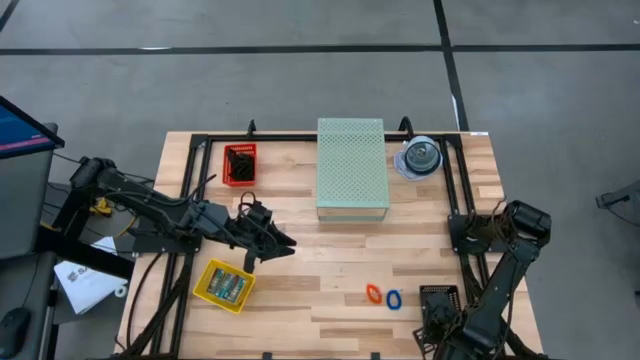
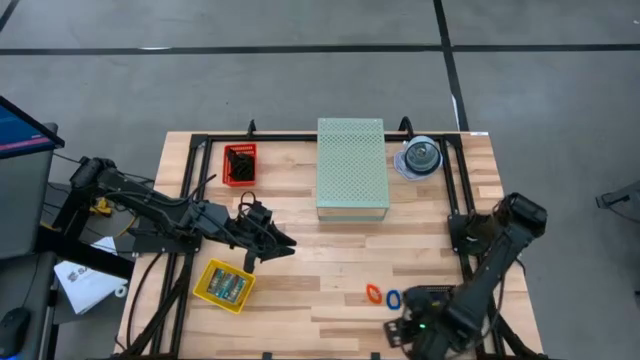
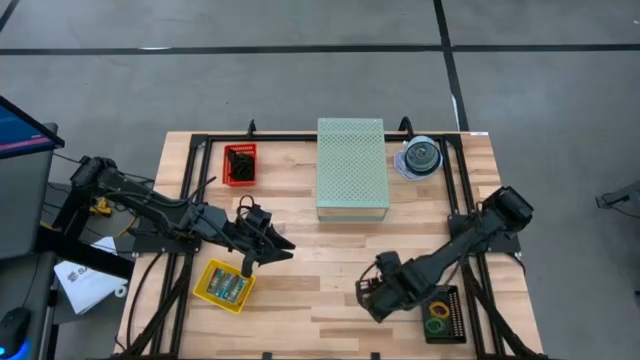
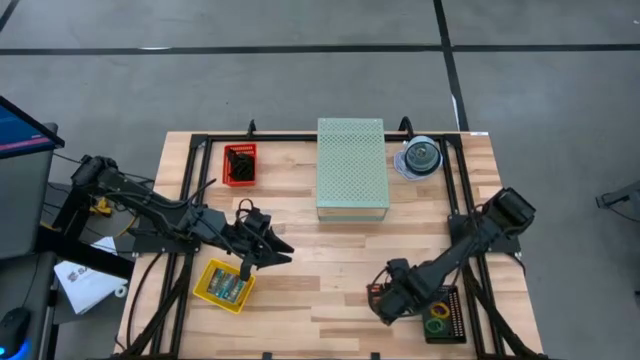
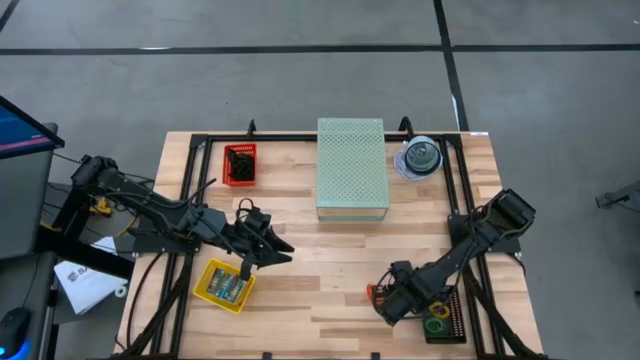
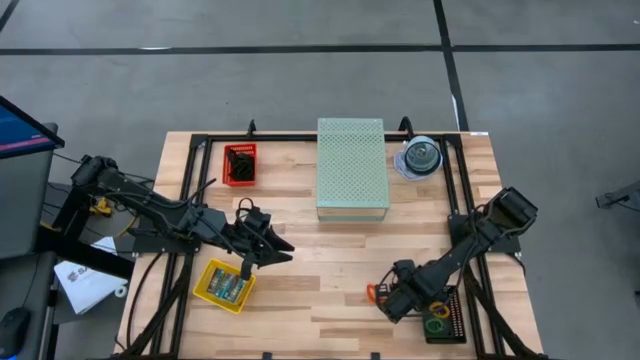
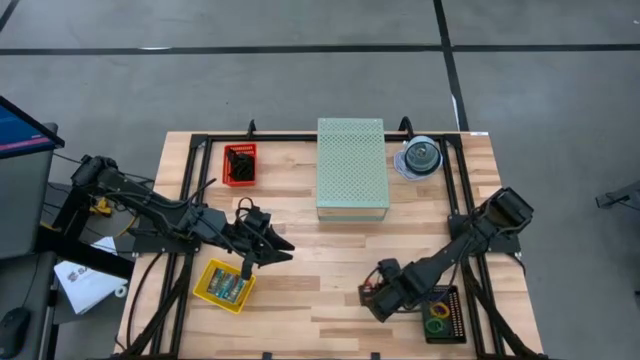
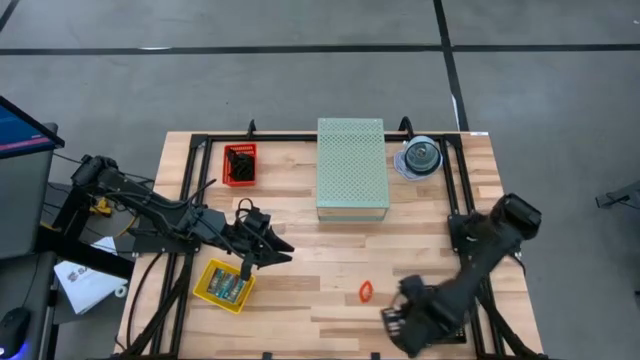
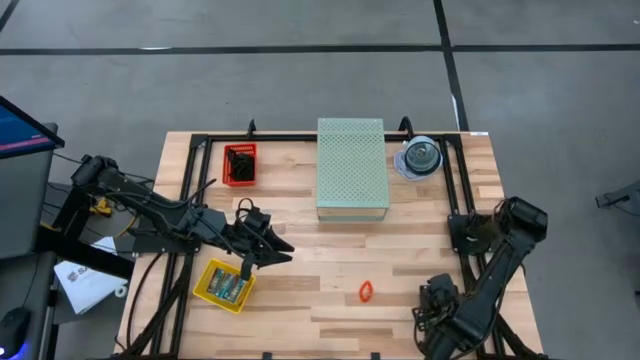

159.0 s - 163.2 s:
Task: Pick & Place Office Desk Supplies
Put the blue spring keychain band into the black bin

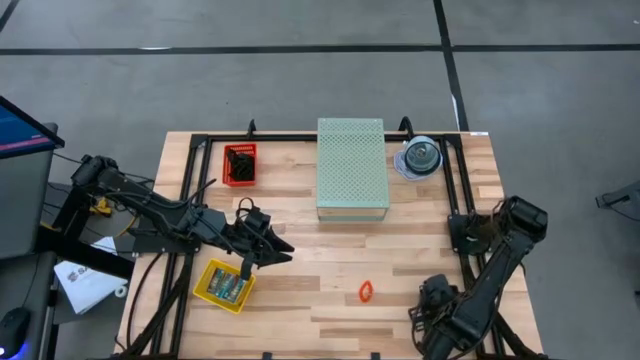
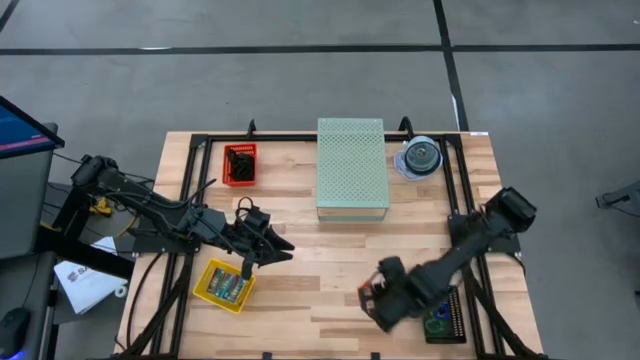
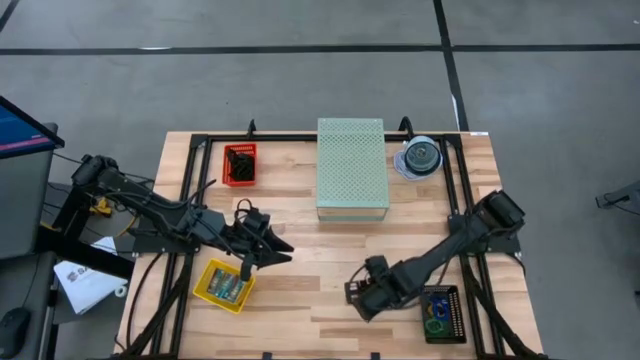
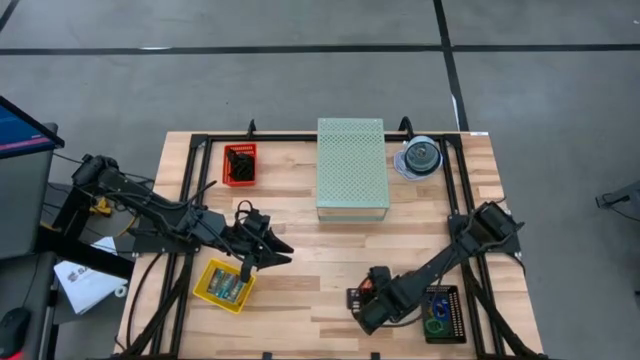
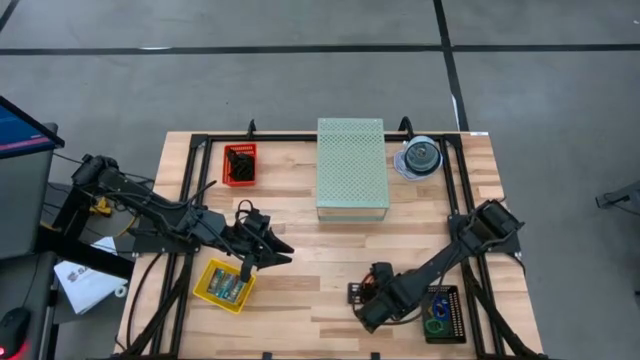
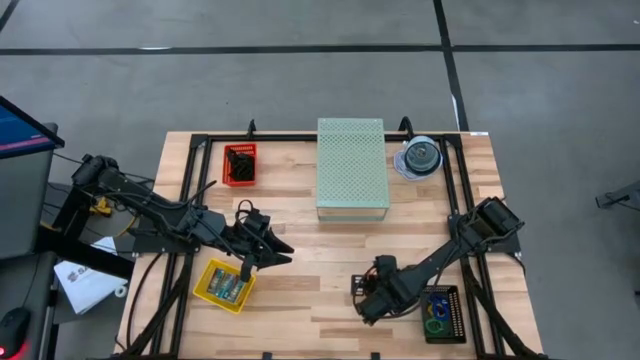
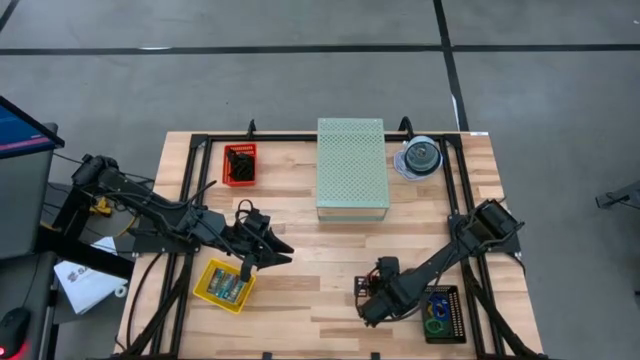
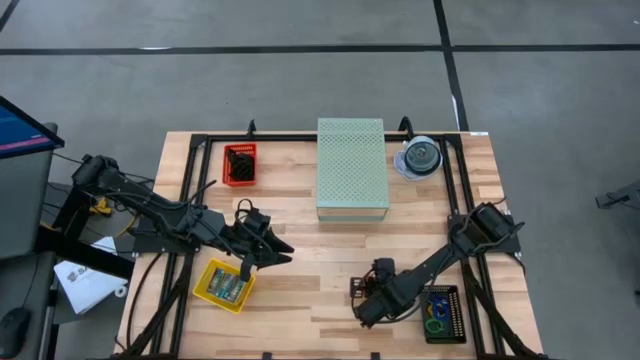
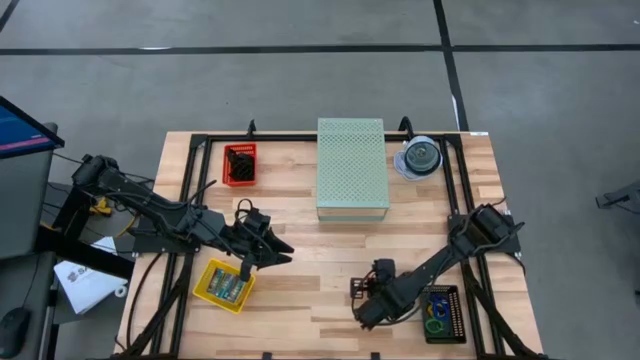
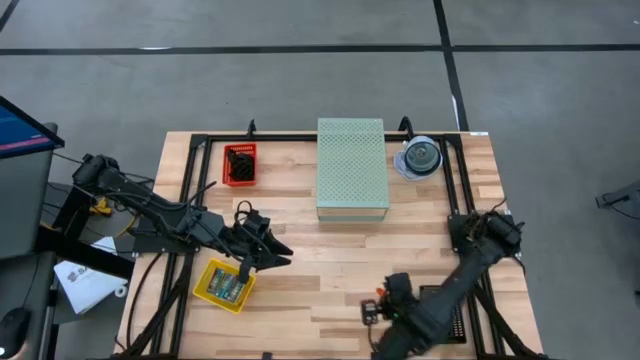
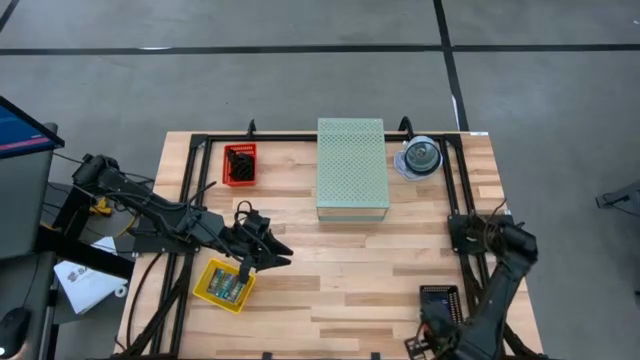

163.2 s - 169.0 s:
Put the orange spring keychain band into the black bin

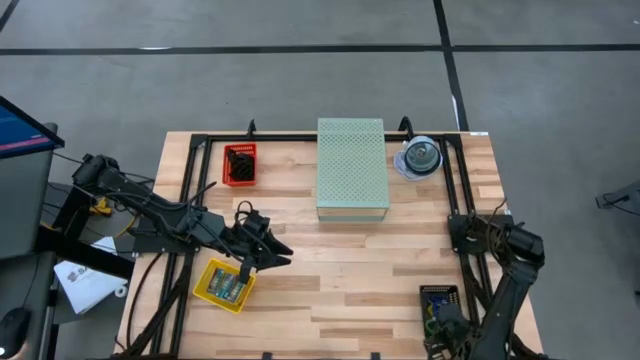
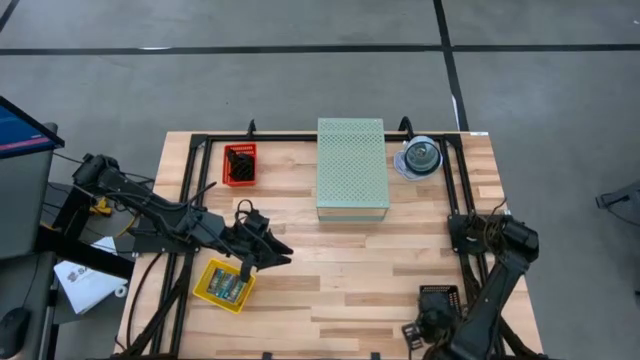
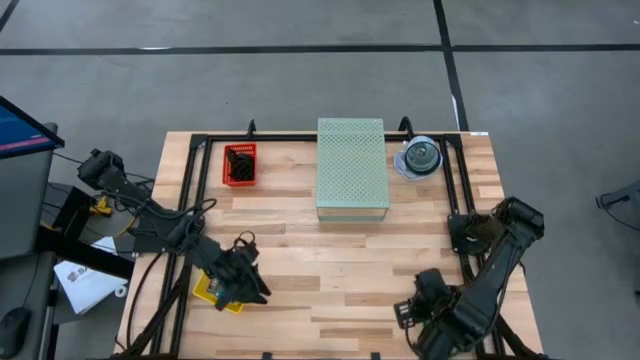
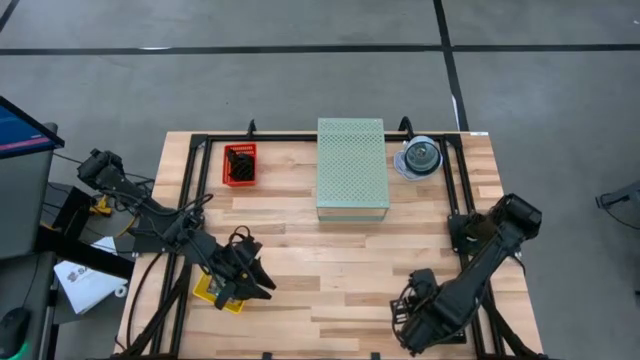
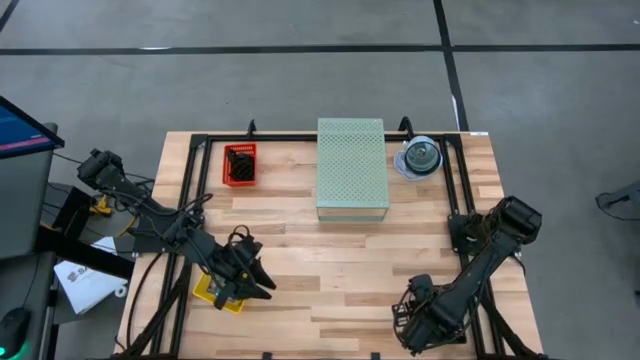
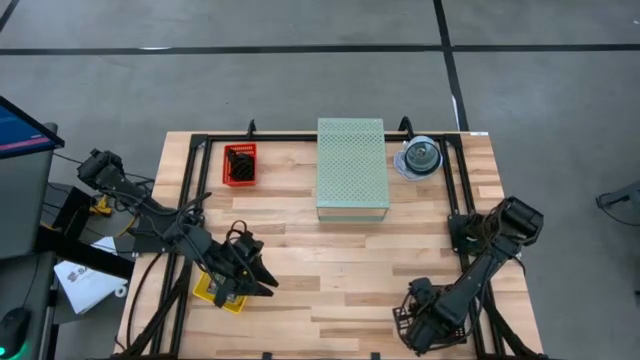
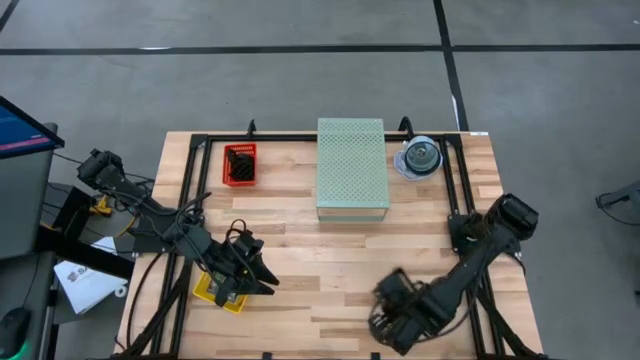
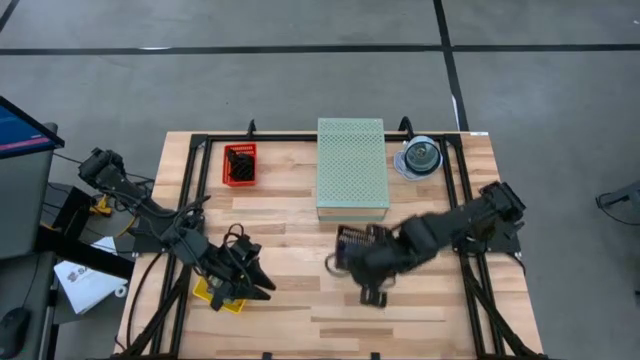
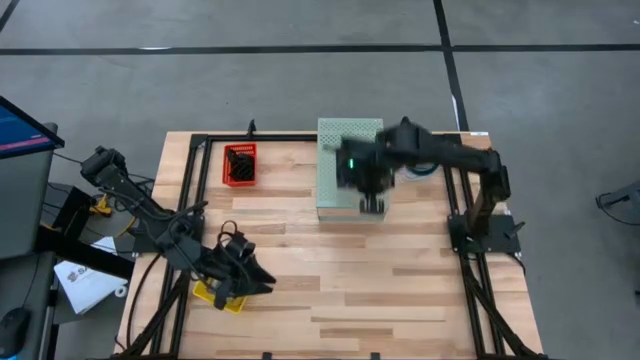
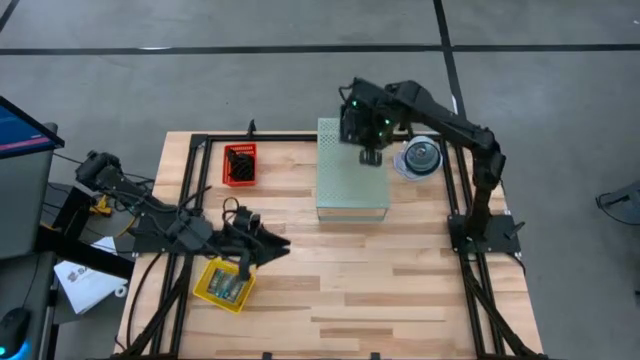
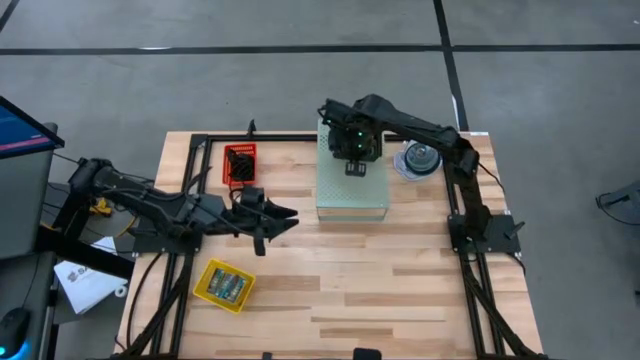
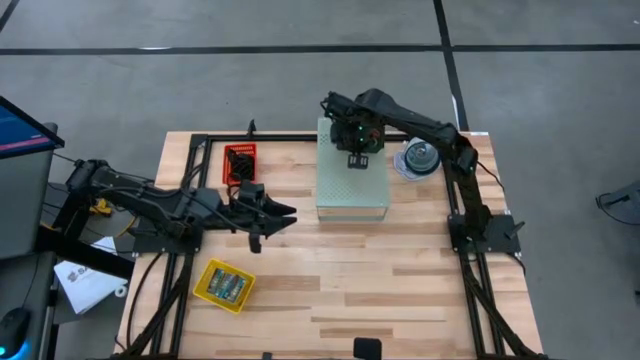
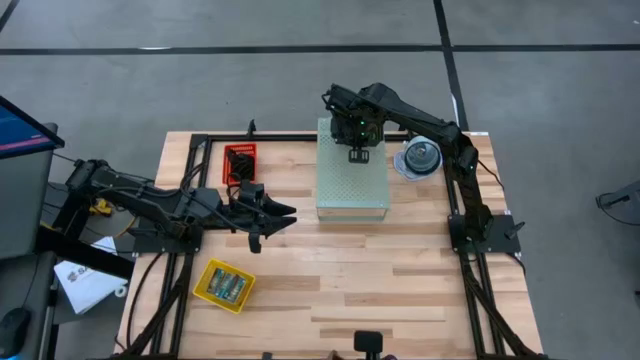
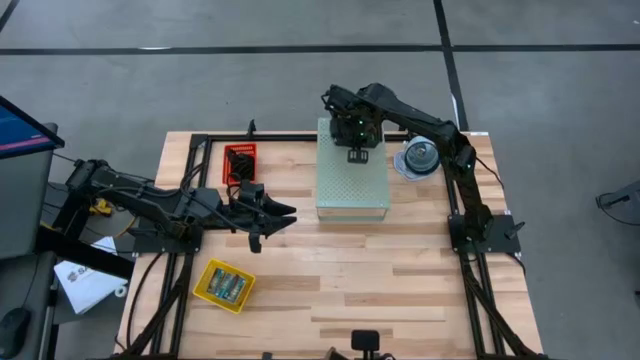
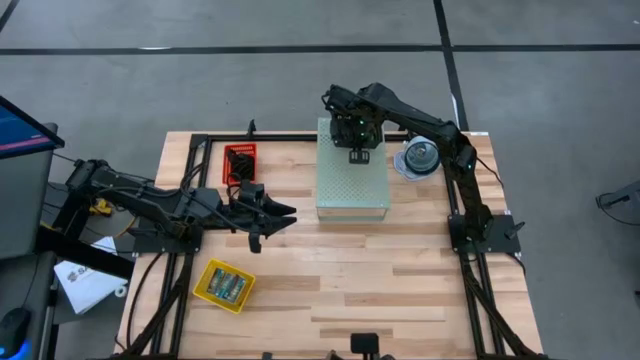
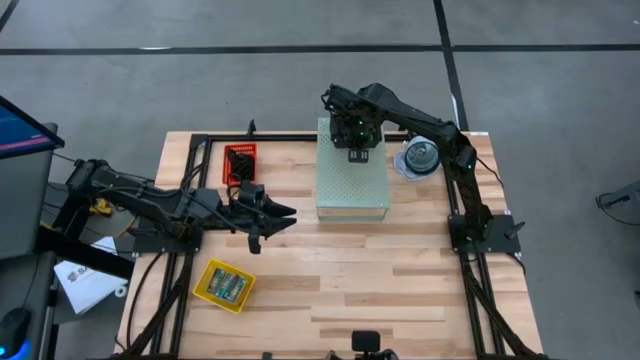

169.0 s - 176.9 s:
Put the black bin on the shelf

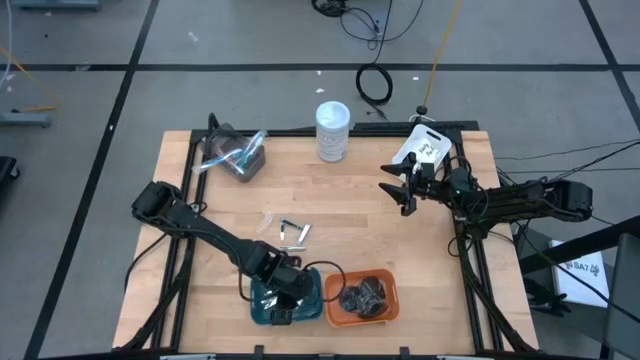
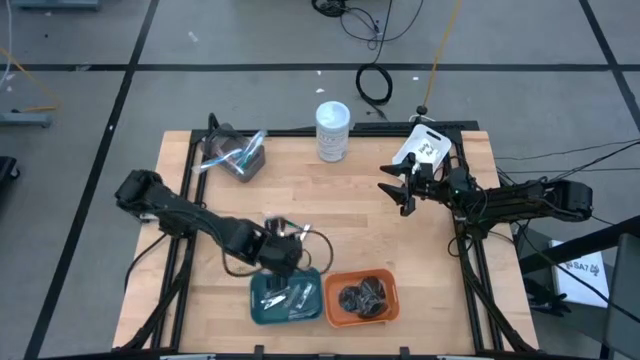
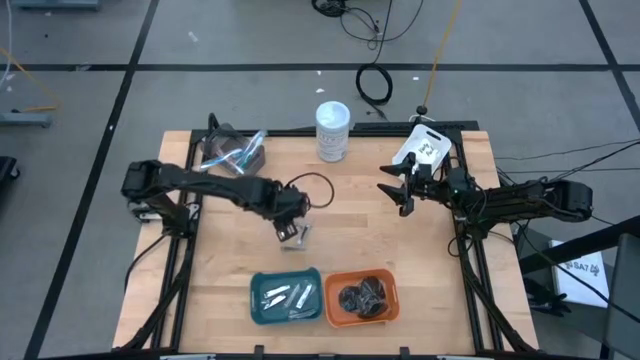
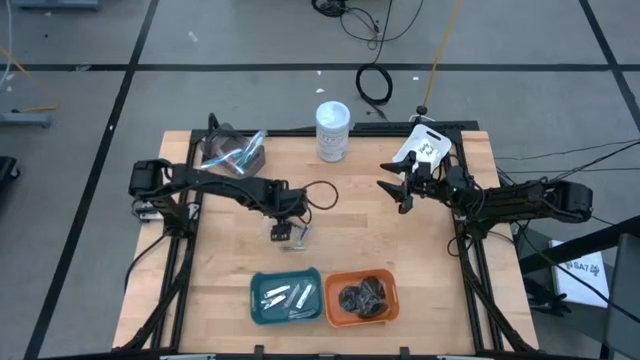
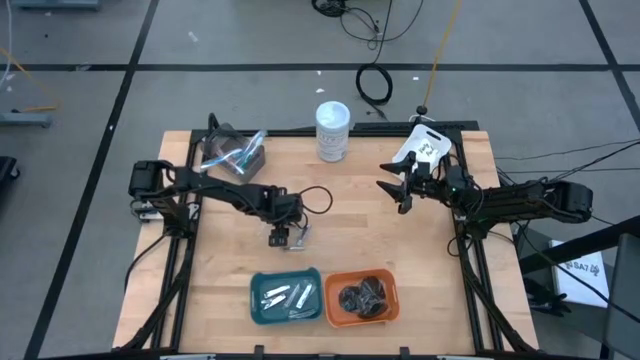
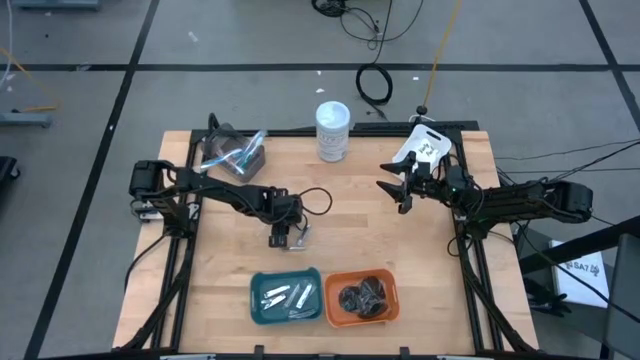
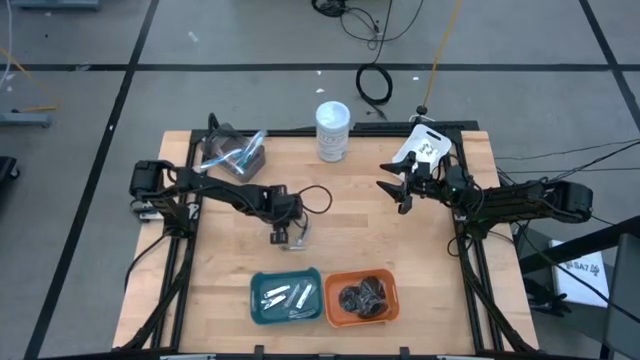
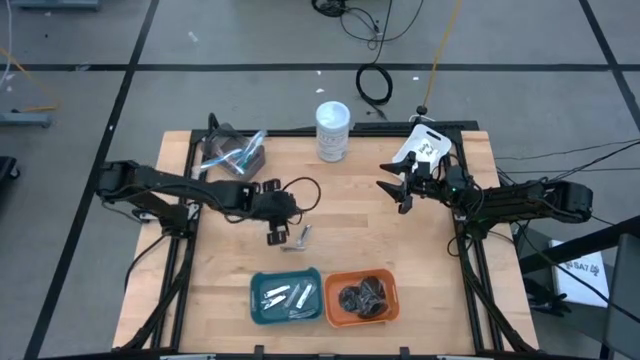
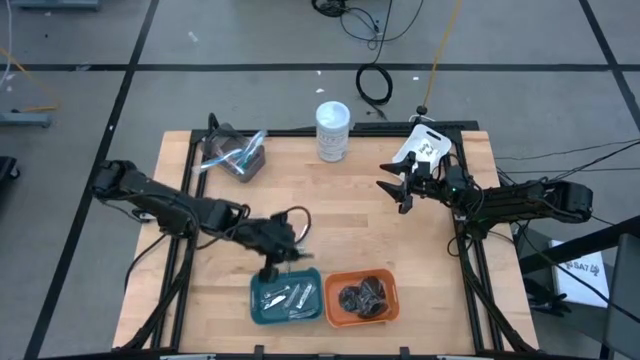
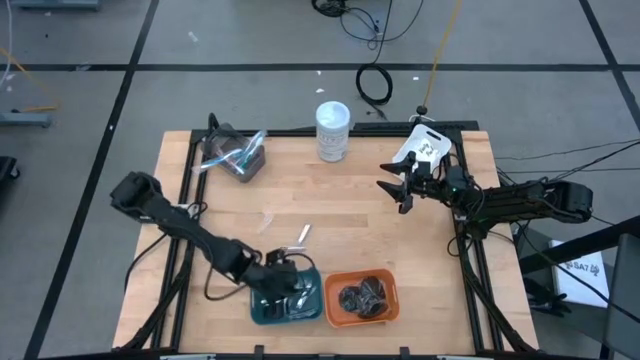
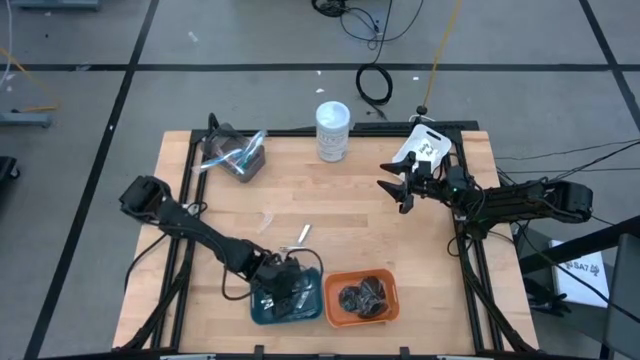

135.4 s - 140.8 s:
Task: Pick & Place Travel size toiletries
Put the silver nail cutter into the green bin
